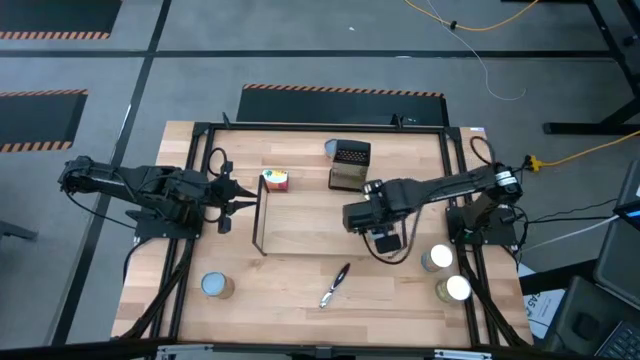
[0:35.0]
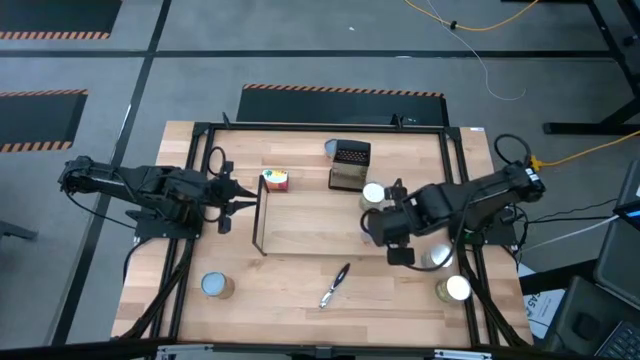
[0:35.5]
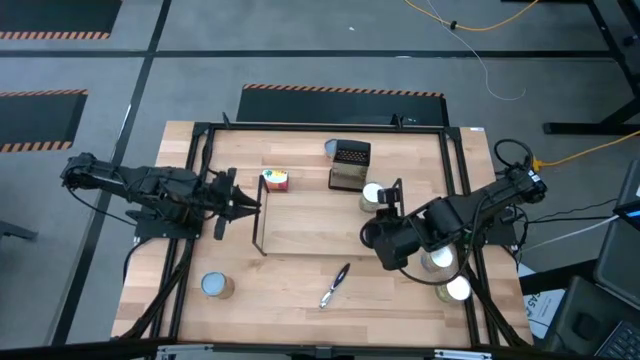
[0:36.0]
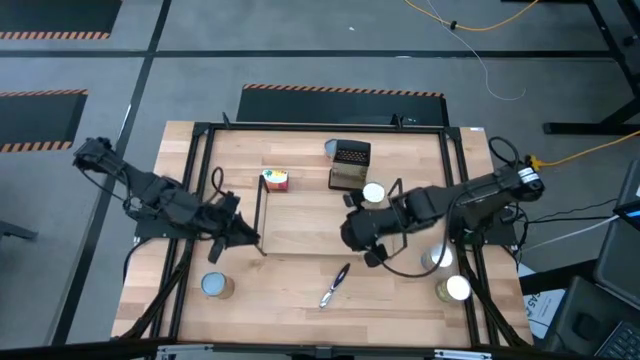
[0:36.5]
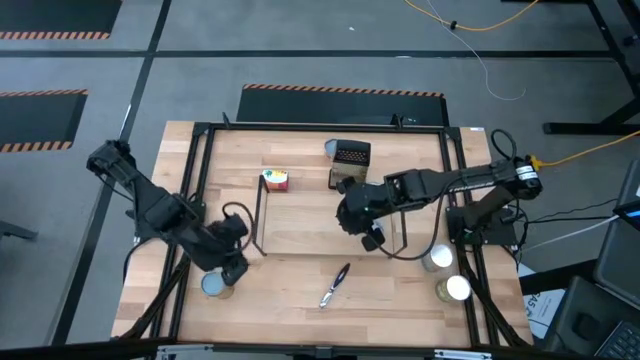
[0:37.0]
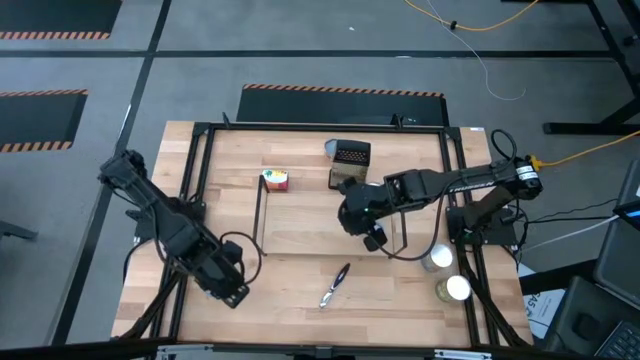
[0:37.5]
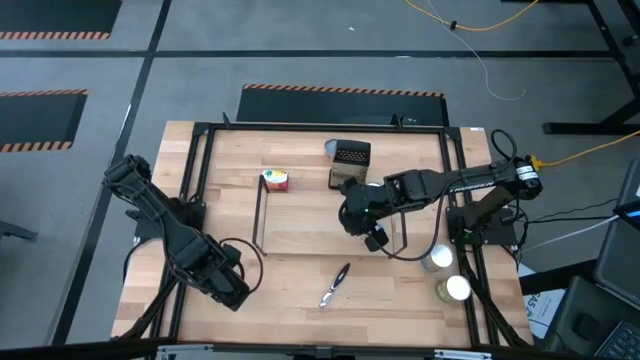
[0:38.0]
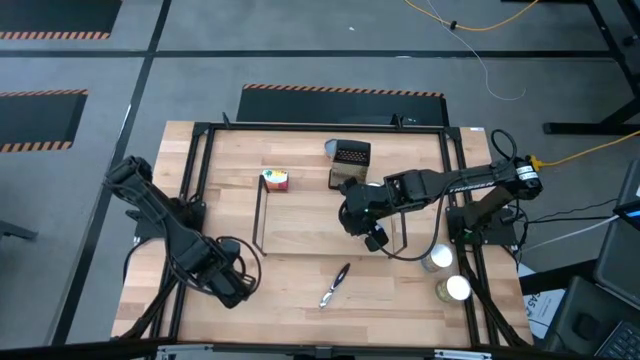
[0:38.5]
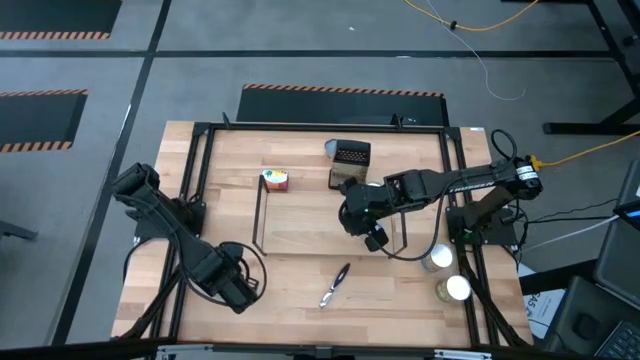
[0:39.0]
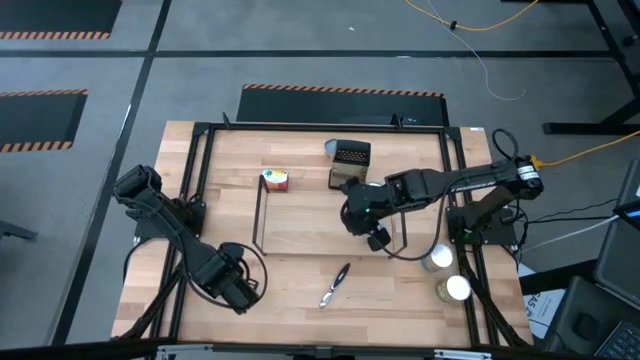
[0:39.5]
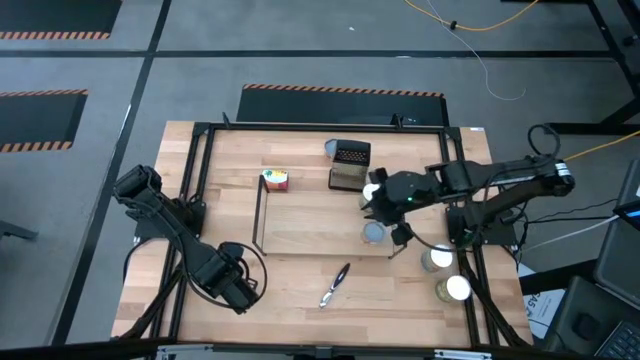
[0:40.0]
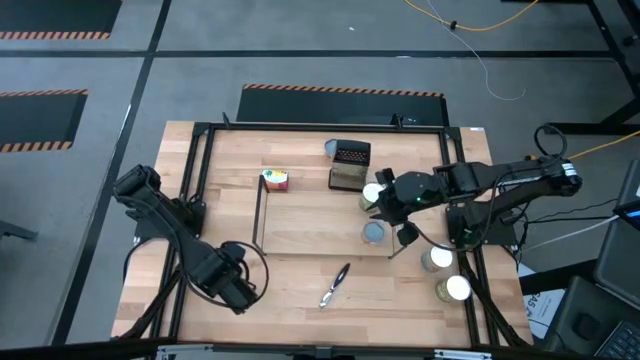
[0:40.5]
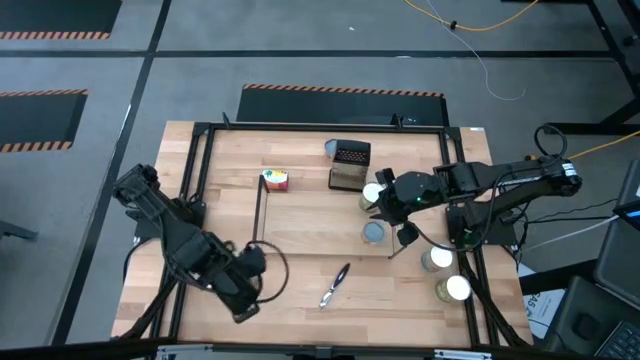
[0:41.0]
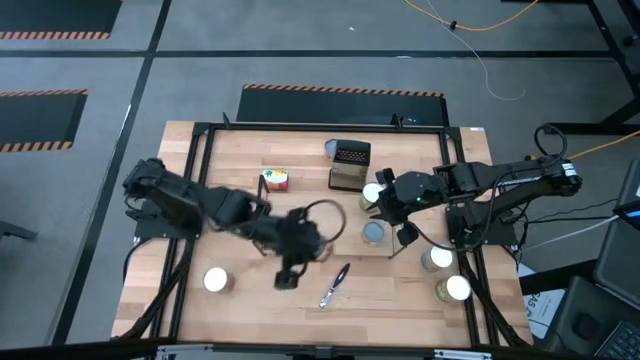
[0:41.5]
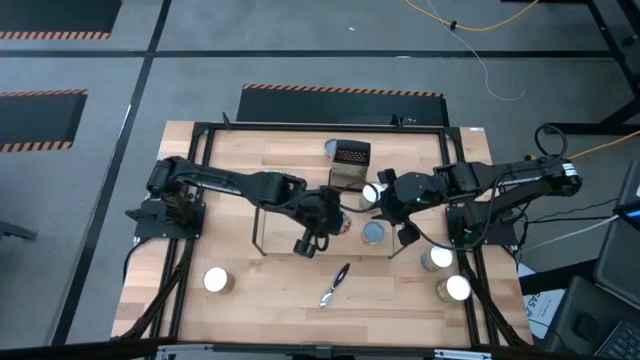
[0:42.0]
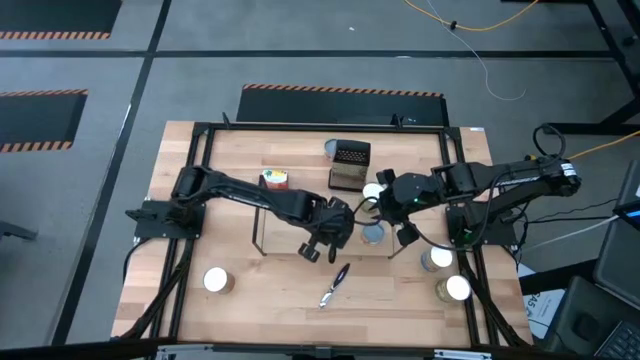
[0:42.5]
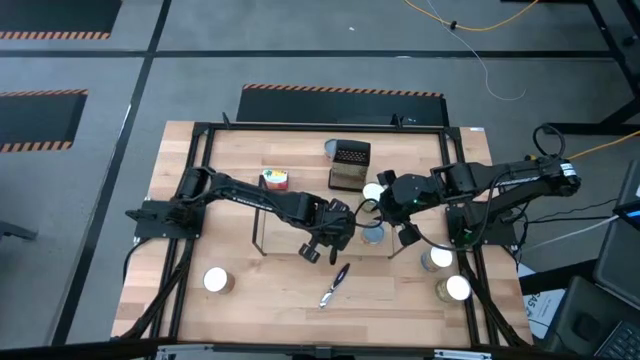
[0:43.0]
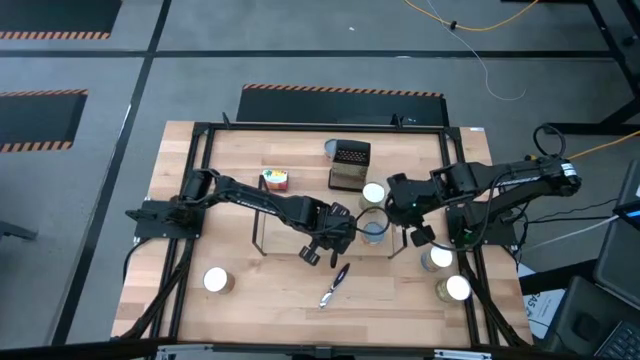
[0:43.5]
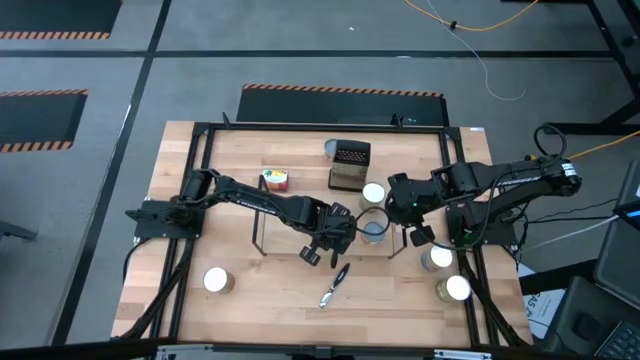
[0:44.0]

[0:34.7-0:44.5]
Task: Pick and place cans onto a shelf
Put the canned pineapple rings on the shelf

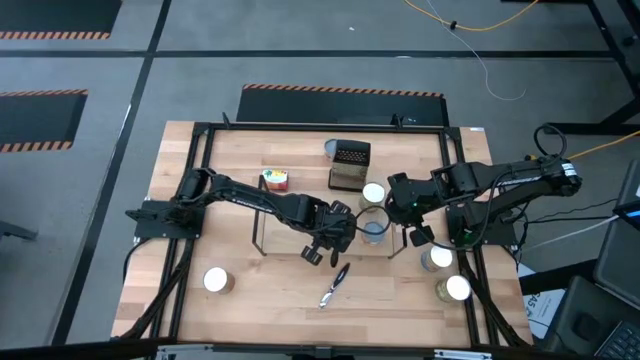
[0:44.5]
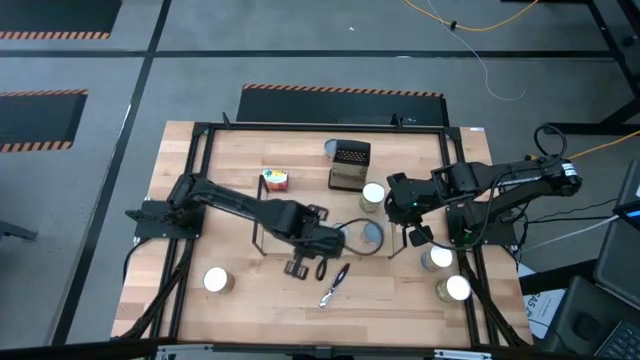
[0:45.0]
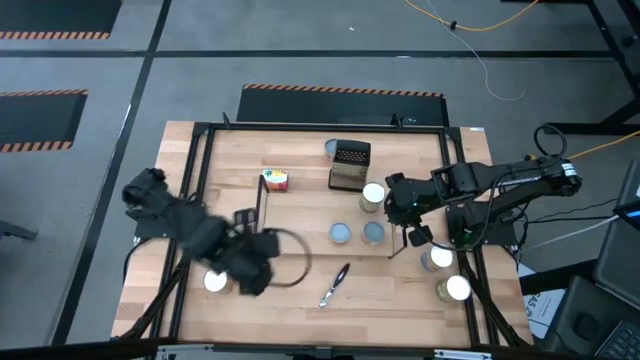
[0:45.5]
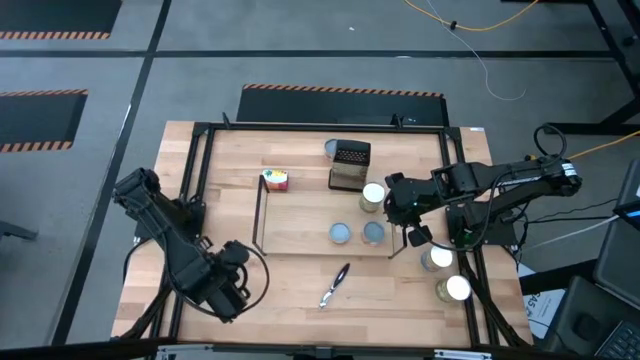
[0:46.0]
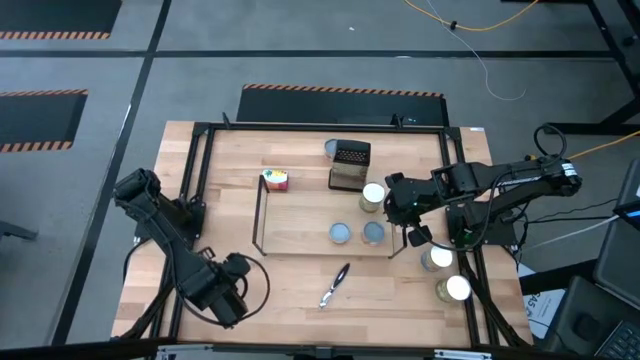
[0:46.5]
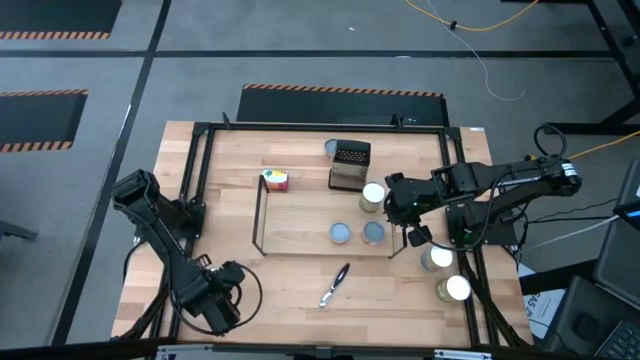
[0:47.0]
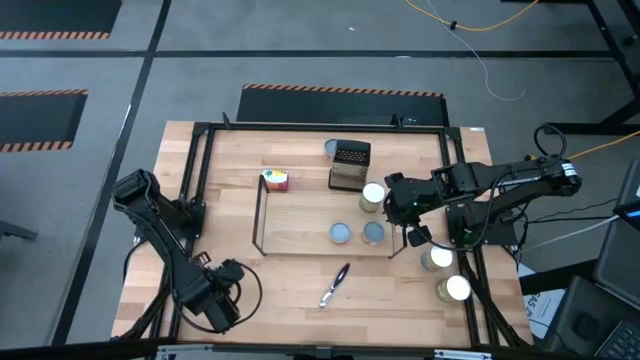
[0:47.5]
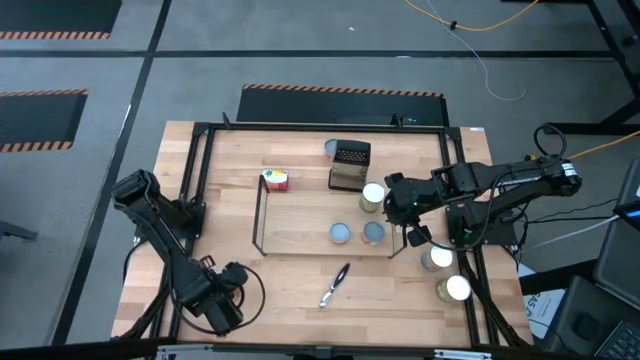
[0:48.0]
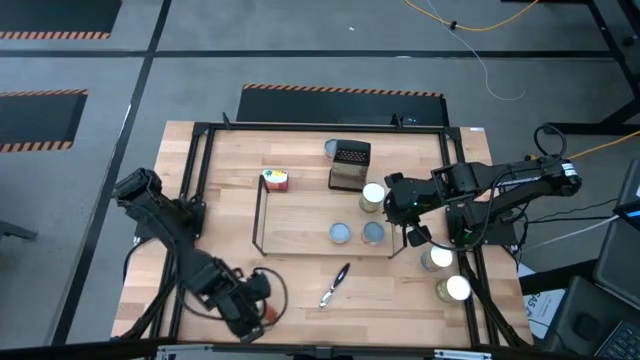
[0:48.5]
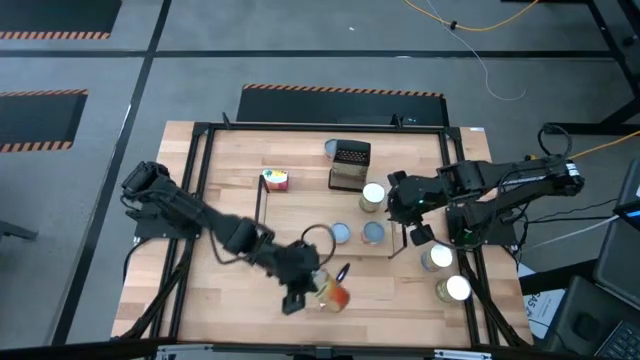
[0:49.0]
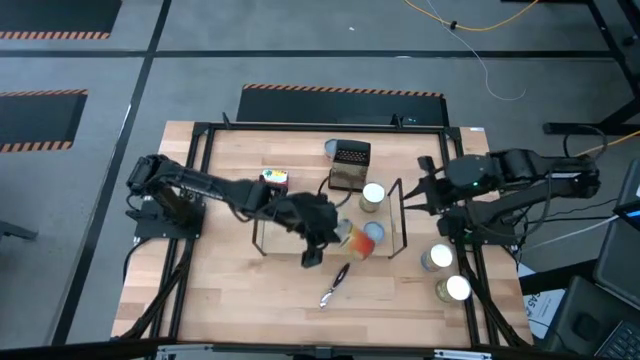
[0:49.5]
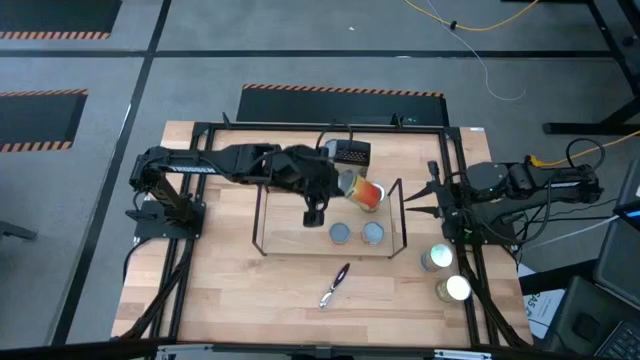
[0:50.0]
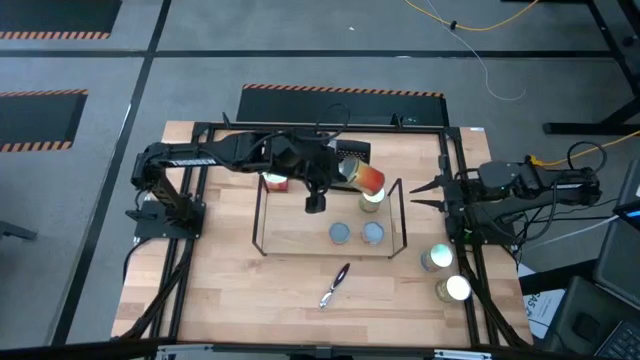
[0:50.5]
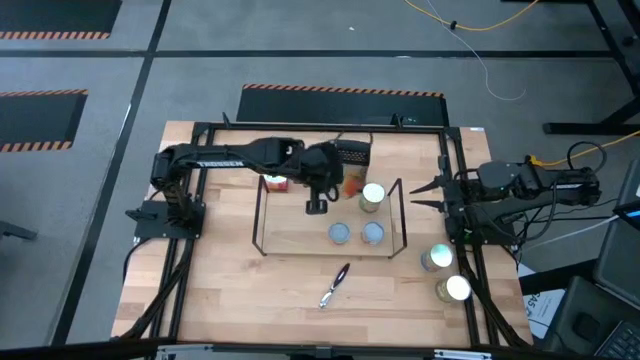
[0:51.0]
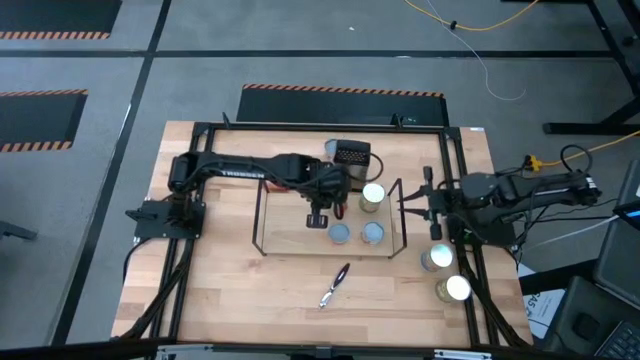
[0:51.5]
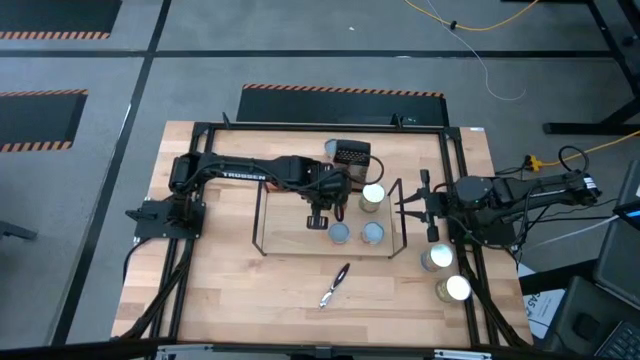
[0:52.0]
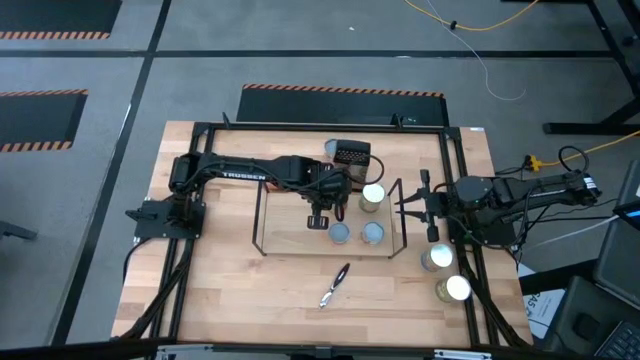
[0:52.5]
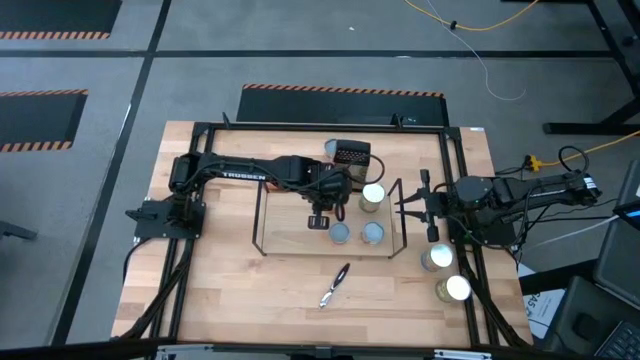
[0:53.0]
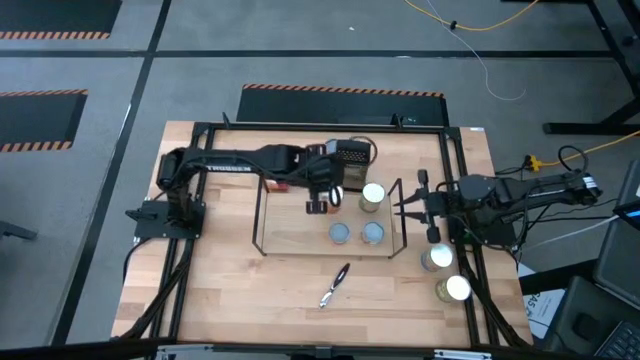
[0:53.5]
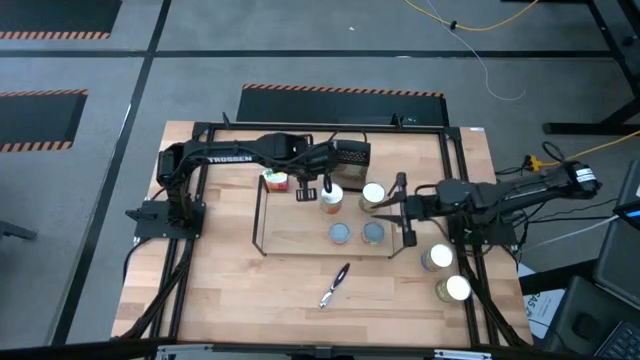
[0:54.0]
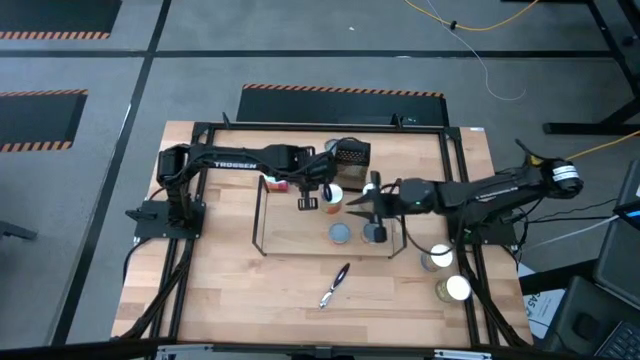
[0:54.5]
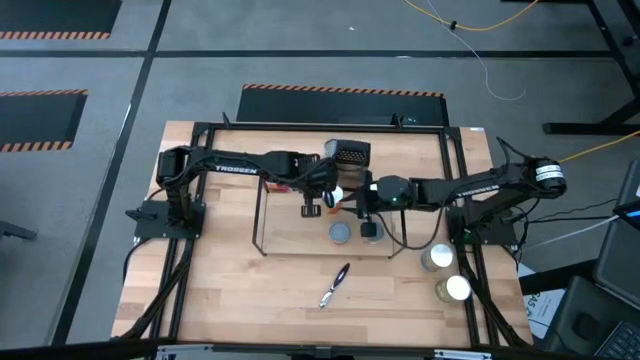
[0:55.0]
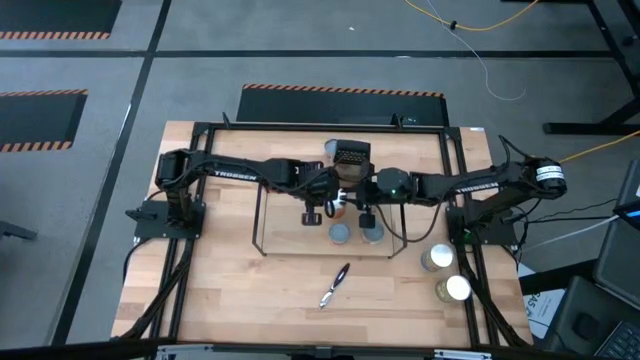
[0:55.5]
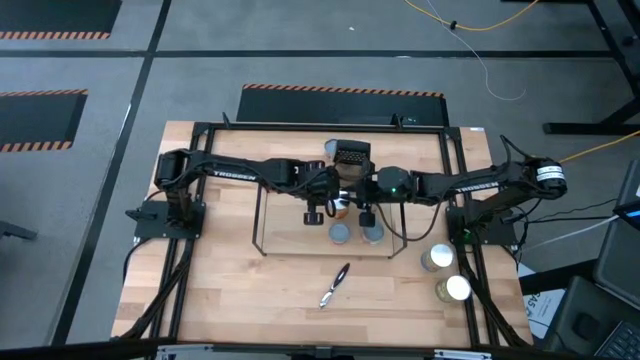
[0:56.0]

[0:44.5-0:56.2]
Put the canned pineapple on the shelf

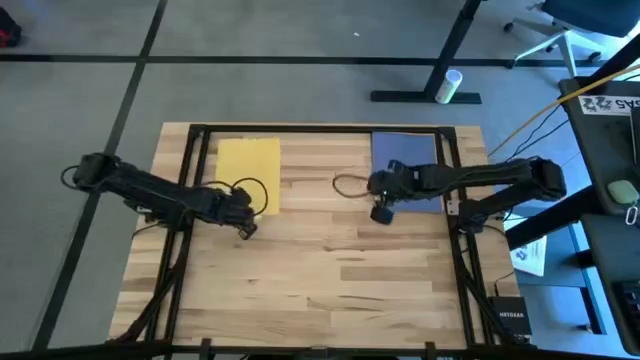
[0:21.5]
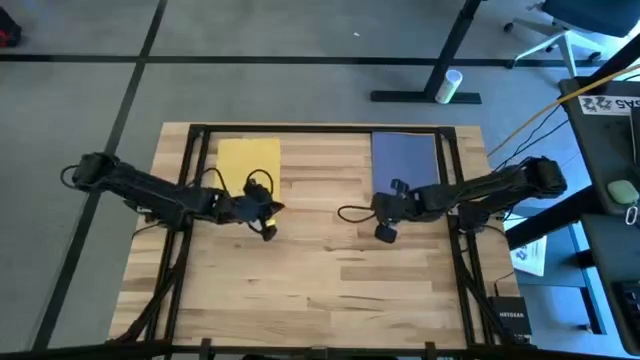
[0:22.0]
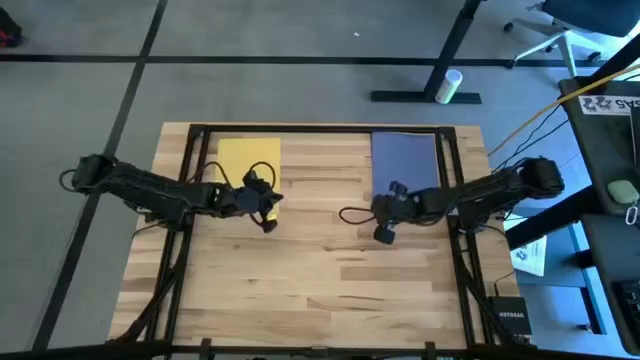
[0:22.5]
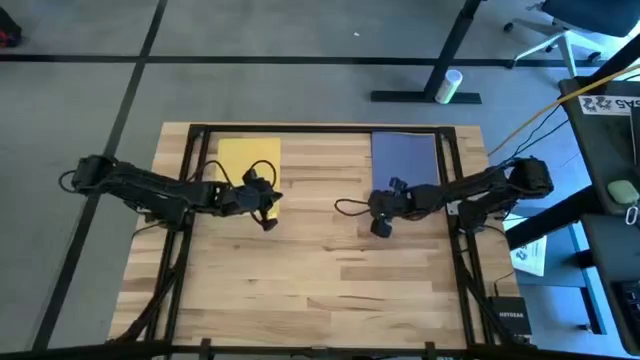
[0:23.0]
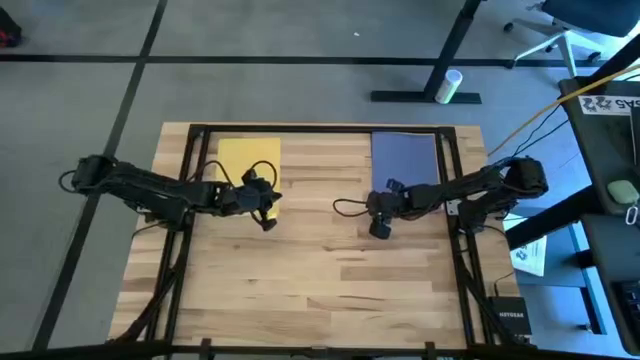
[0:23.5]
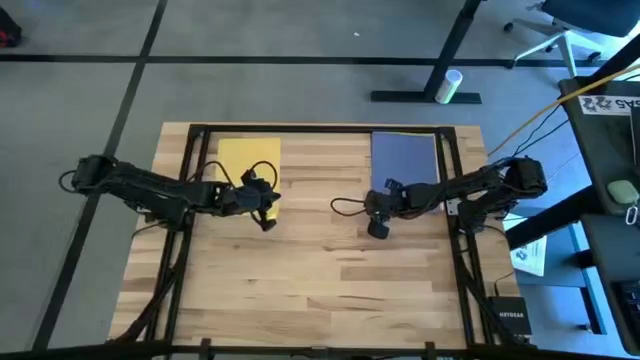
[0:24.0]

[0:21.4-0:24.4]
Task: Organize paper
Move the violet paper to the bottom left of the table
